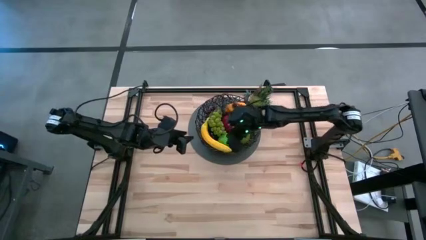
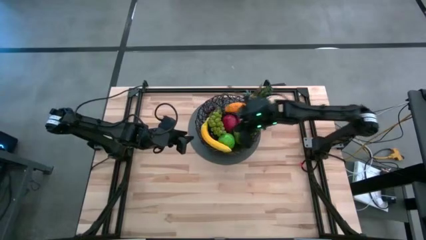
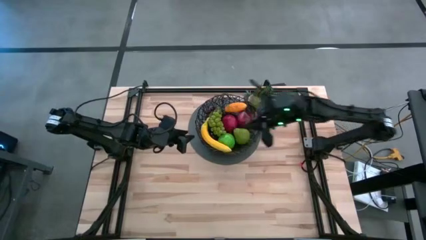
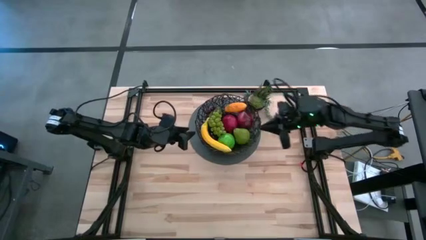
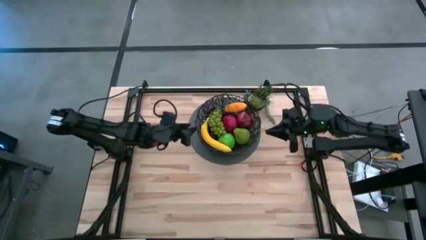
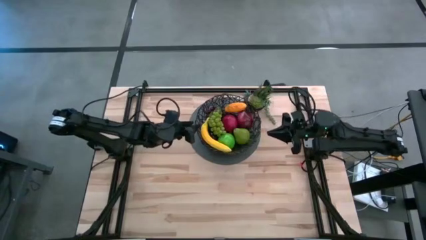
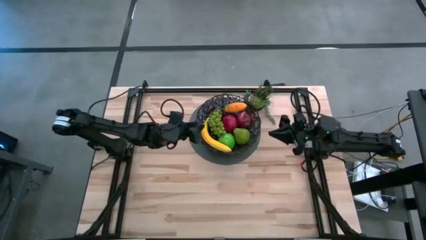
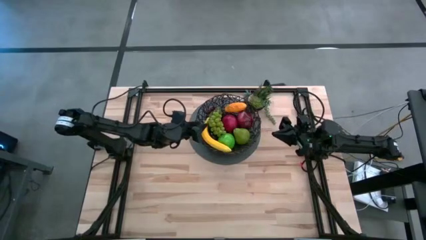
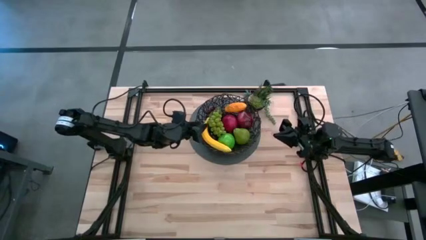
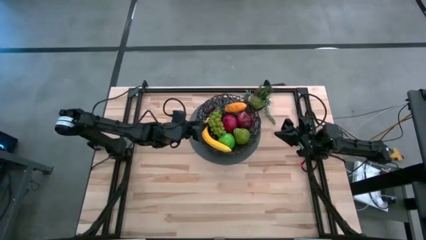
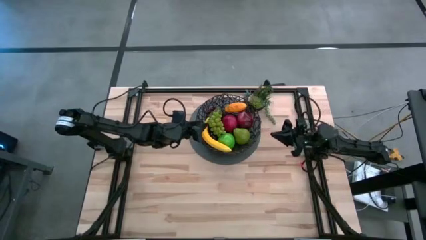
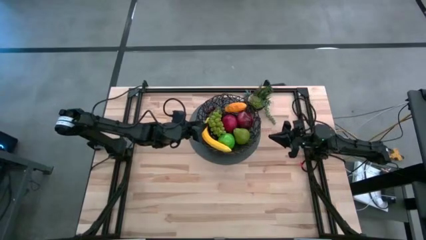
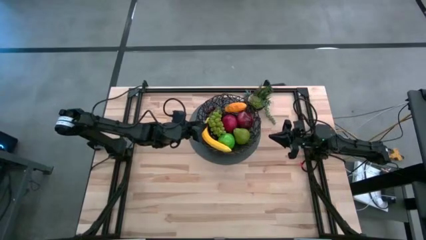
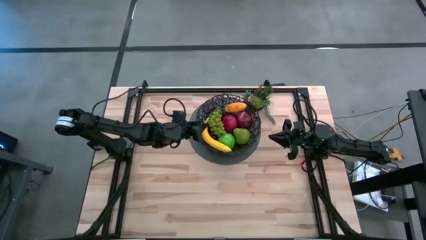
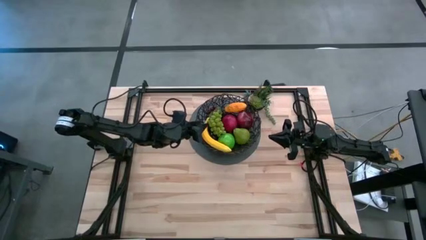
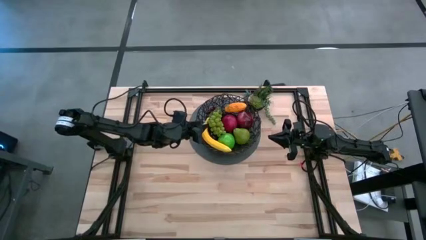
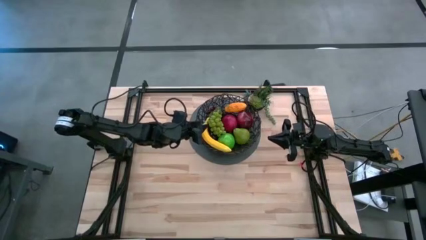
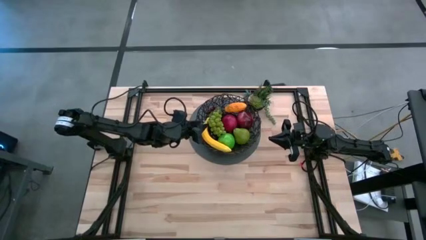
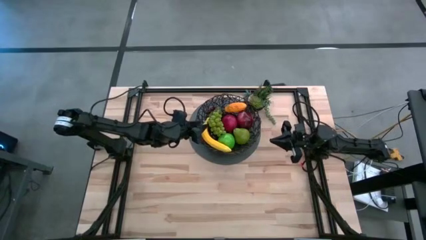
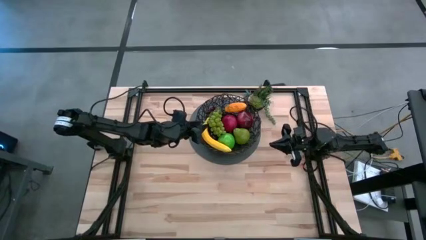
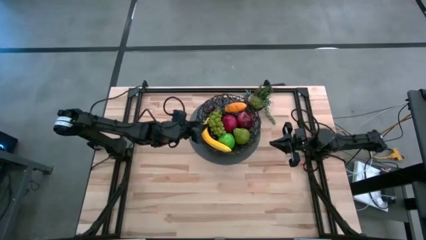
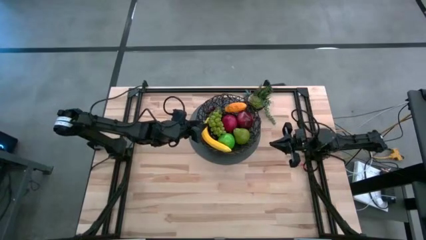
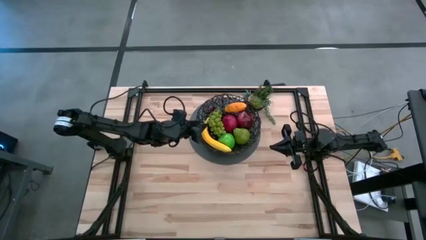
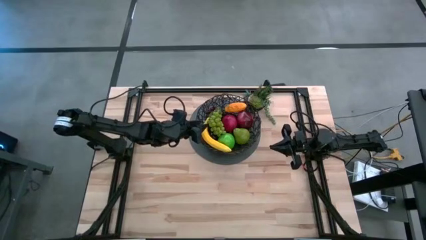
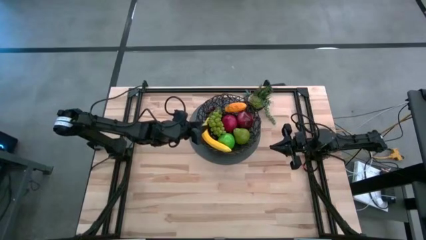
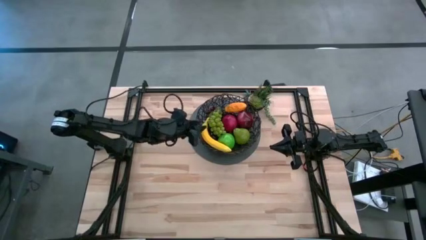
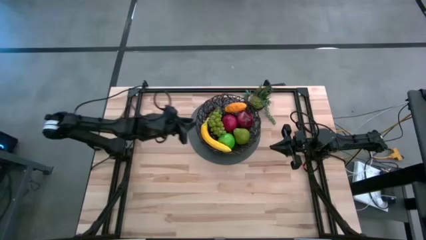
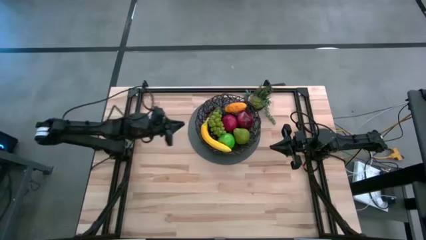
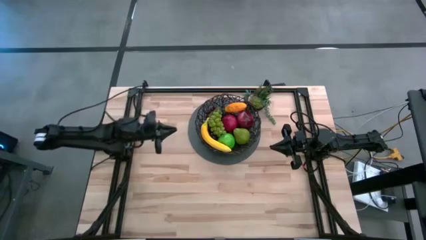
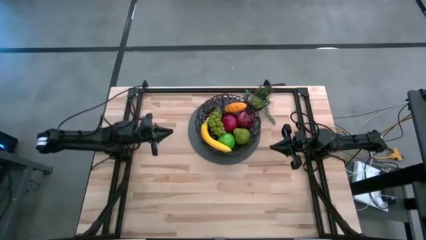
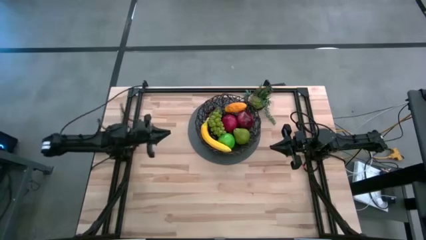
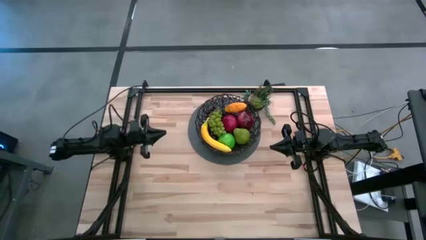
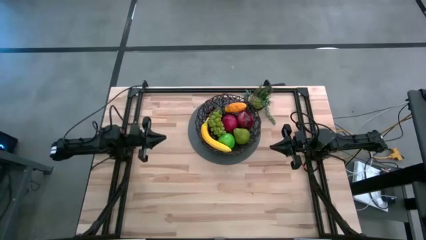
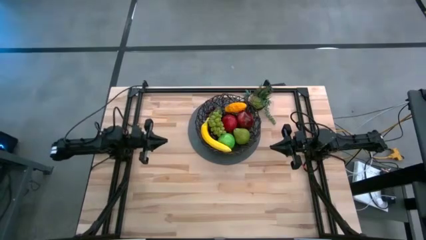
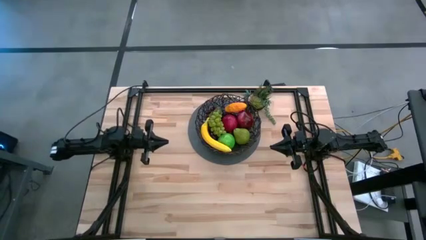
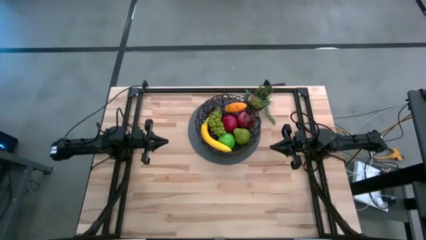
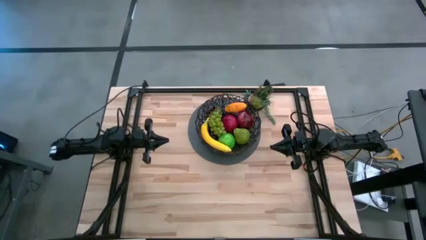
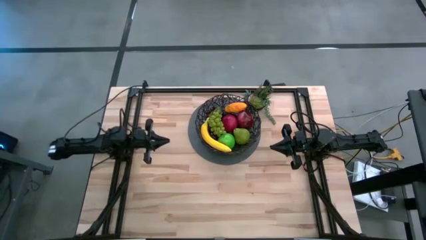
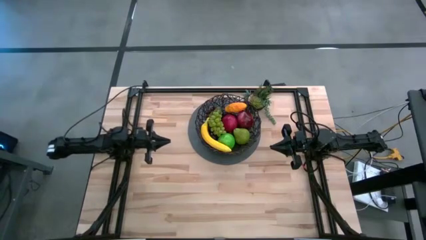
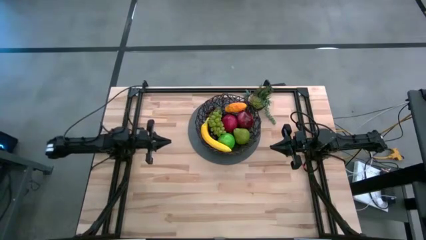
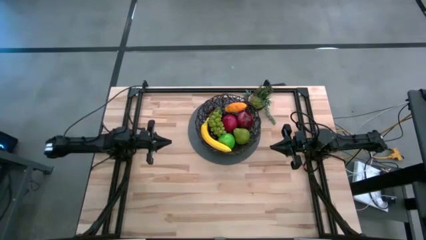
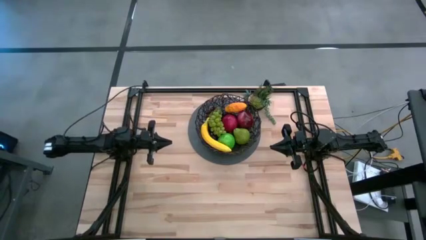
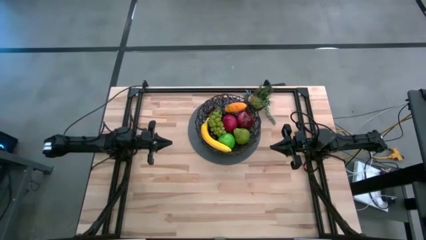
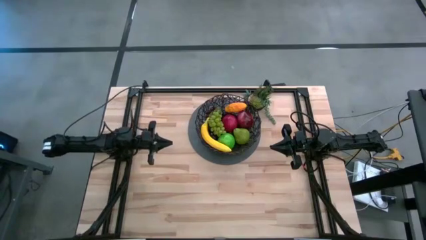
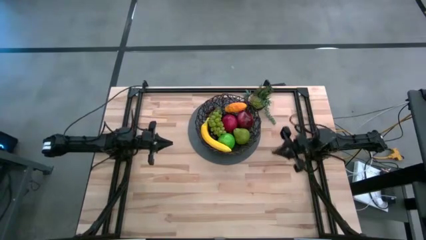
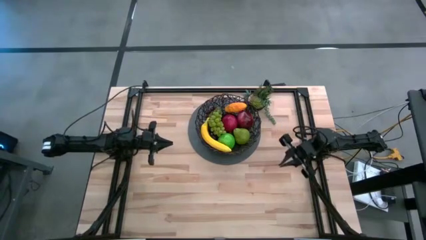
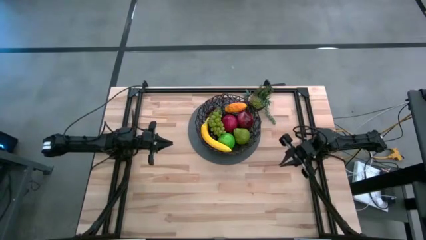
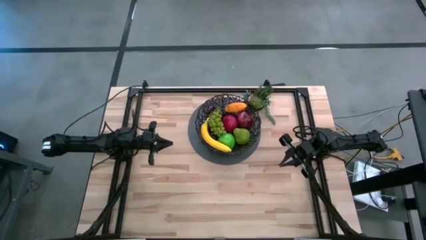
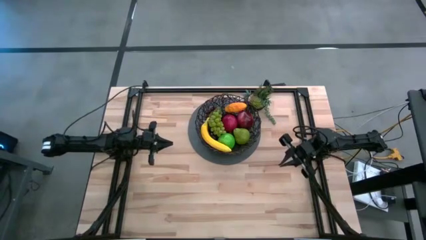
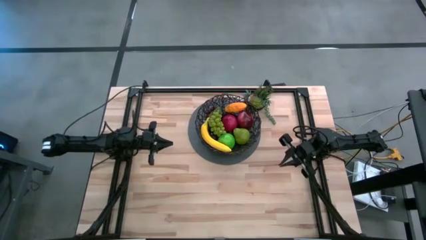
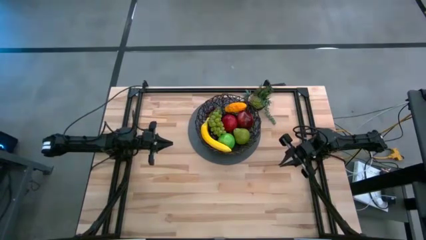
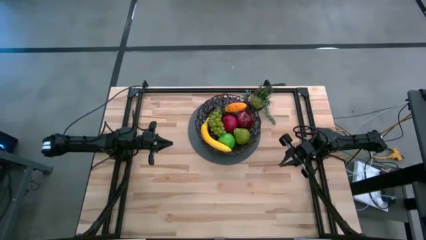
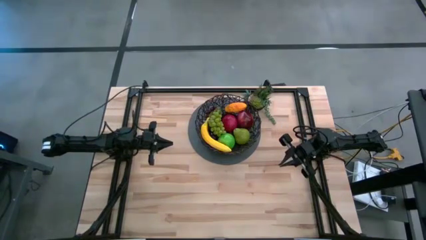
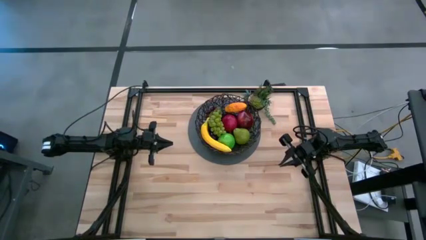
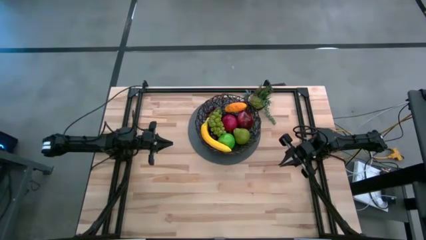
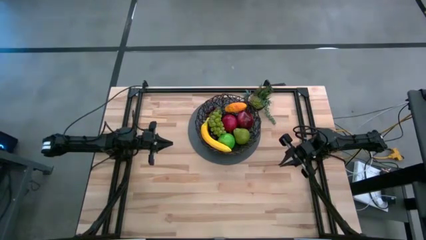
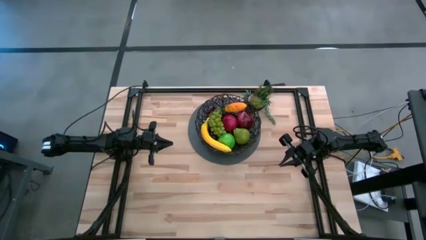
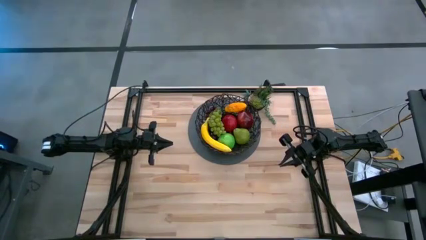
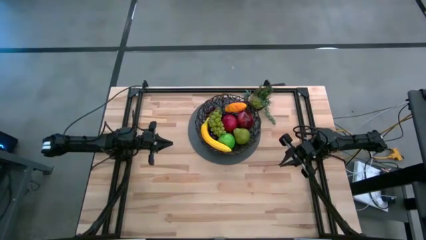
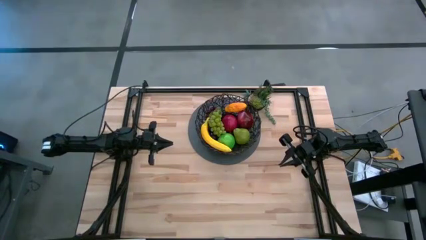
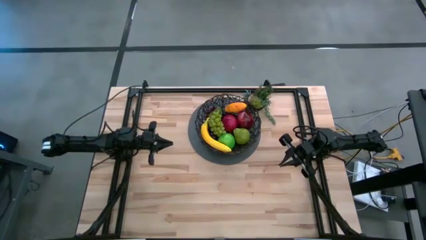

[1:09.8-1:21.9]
Task: Build produce basket
Return to Home Position

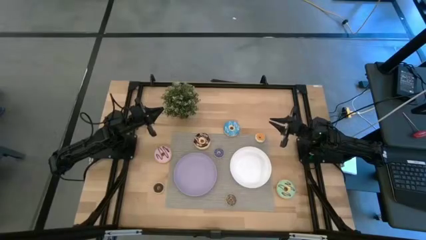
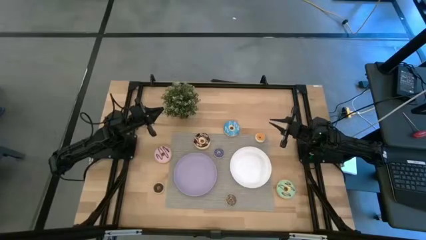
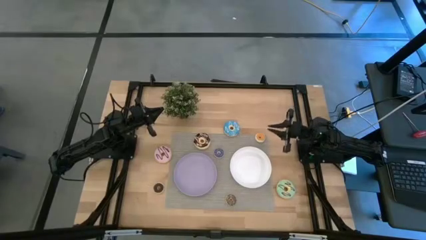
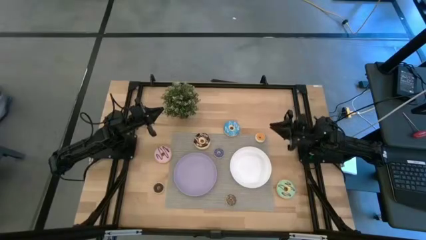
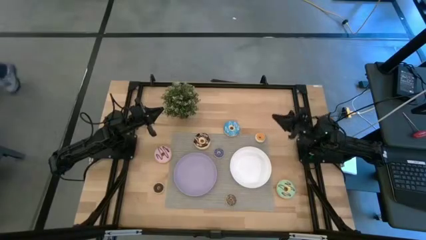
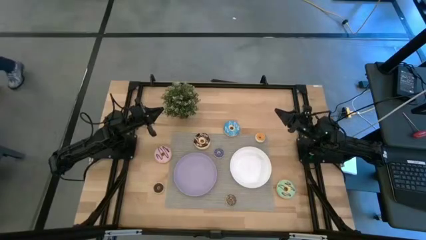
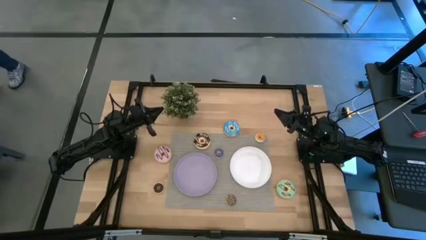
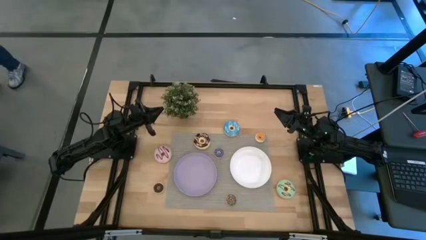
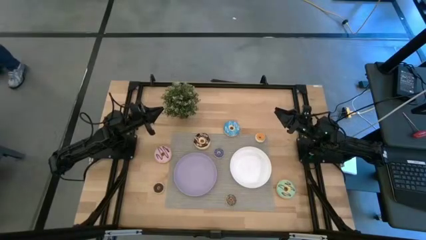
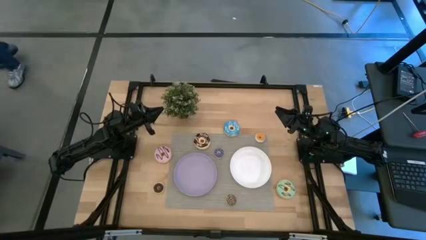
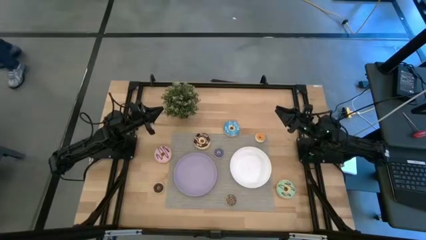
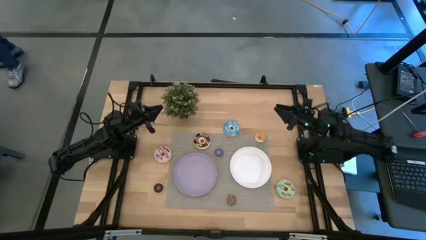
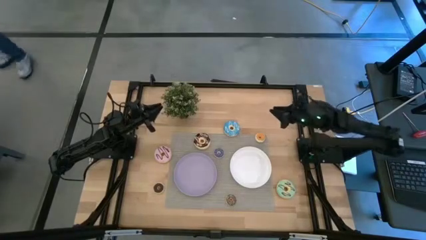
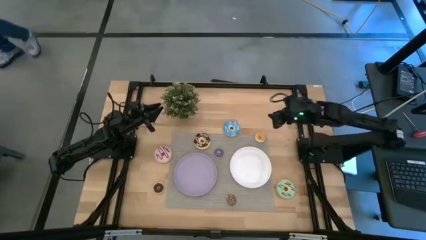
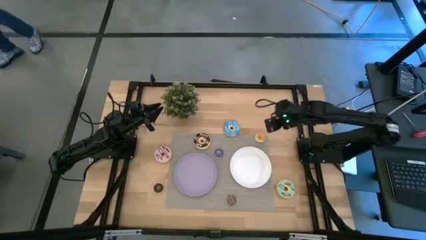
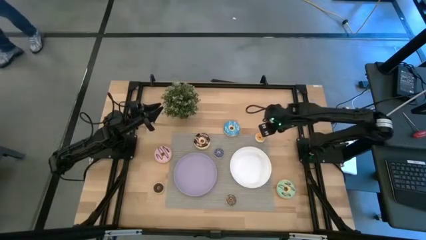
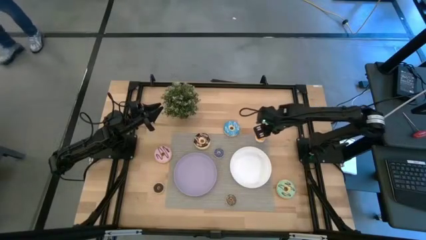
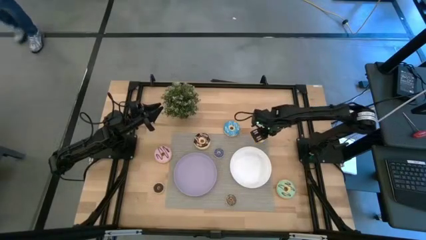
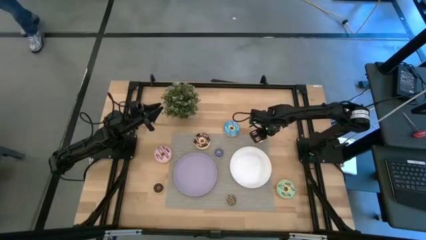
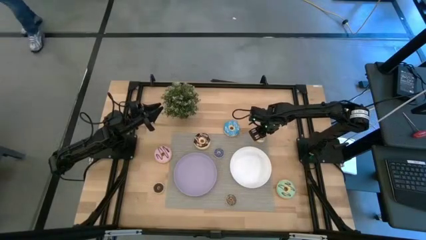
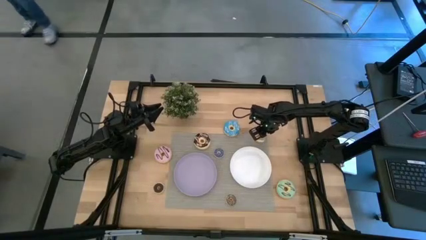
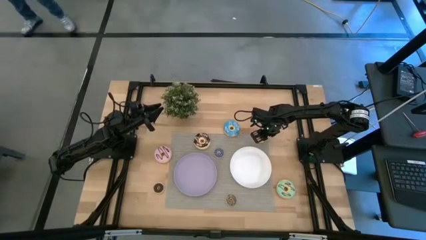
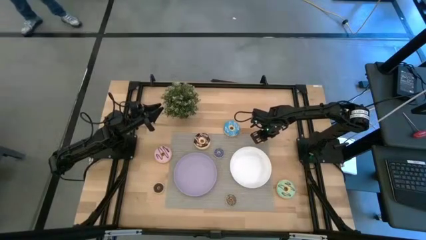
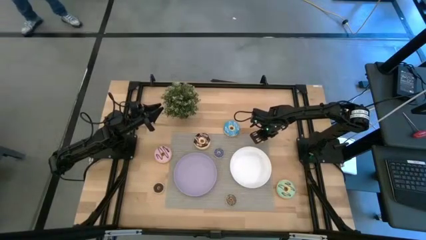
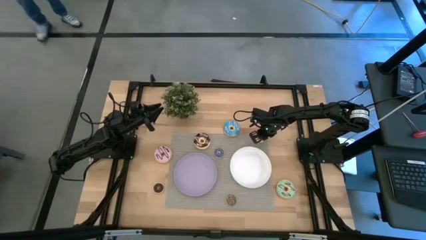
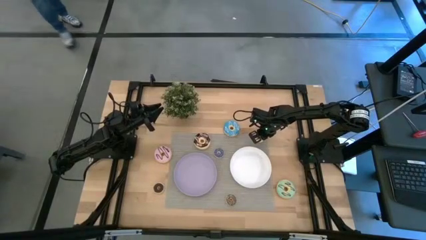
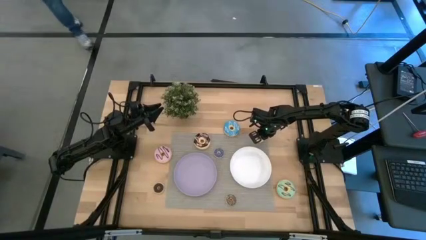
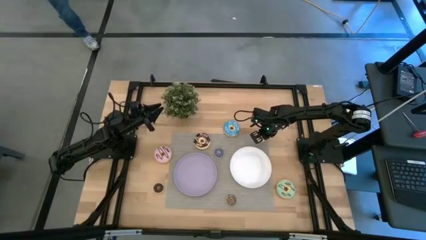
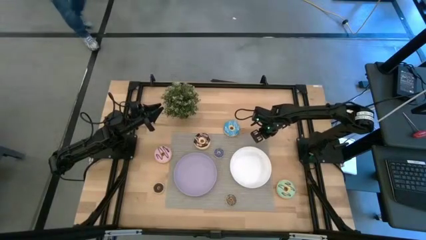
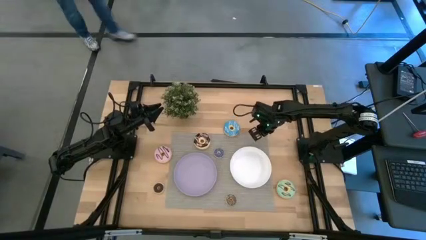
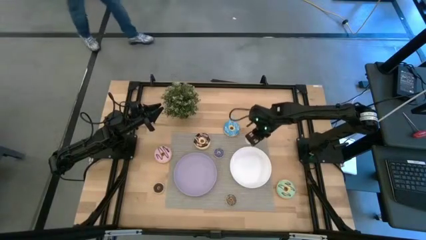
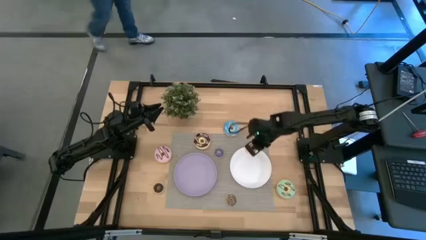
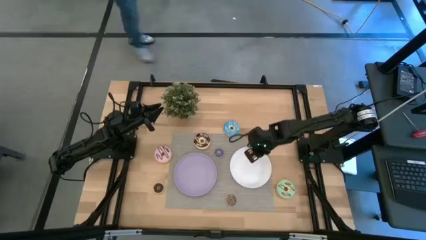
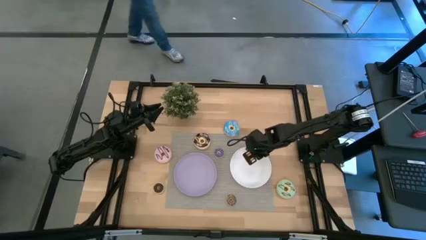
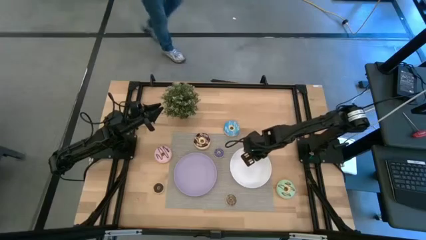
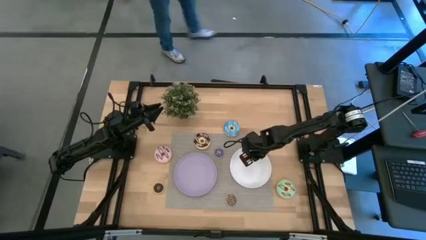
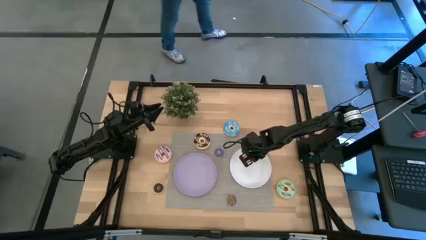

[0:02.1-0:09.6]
Task: Pick & Place donuts
Put the small orange donut on the white plate
